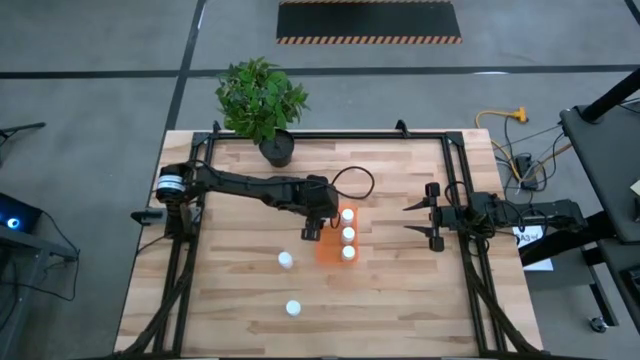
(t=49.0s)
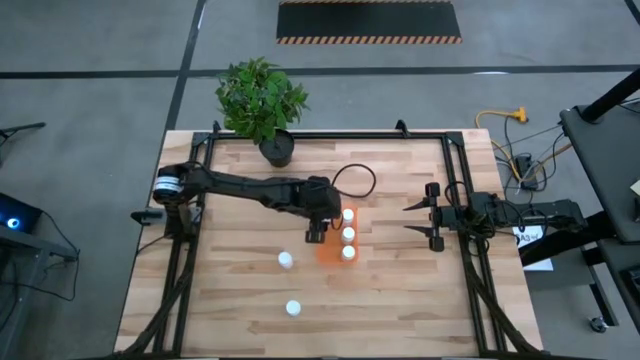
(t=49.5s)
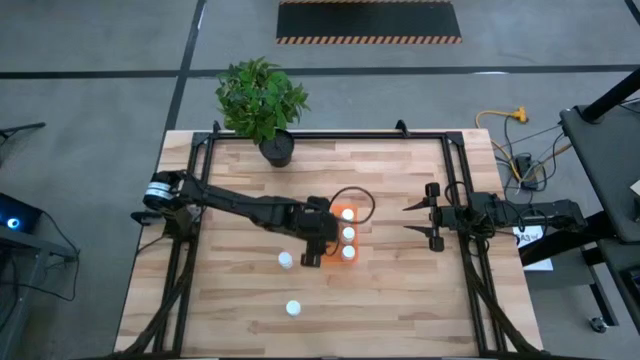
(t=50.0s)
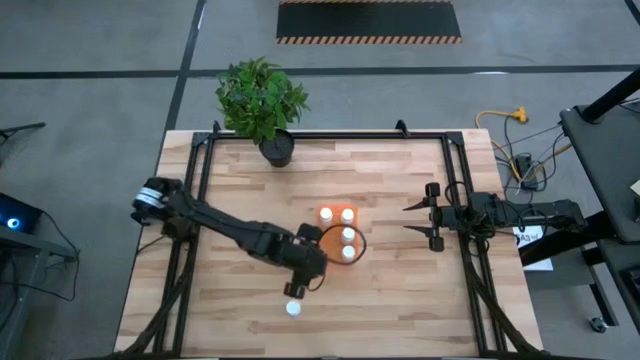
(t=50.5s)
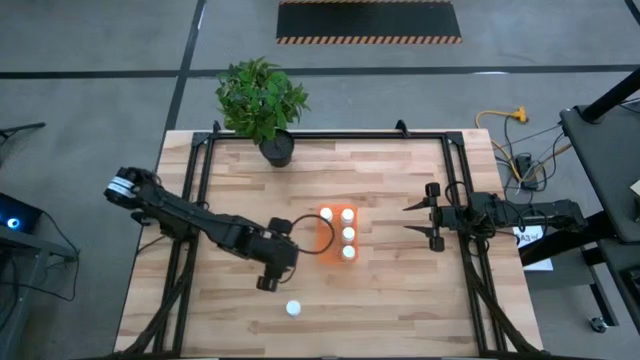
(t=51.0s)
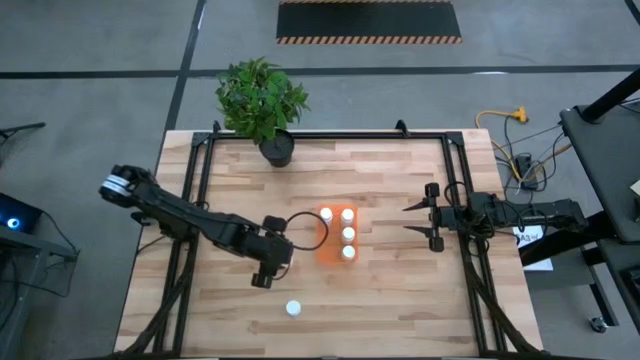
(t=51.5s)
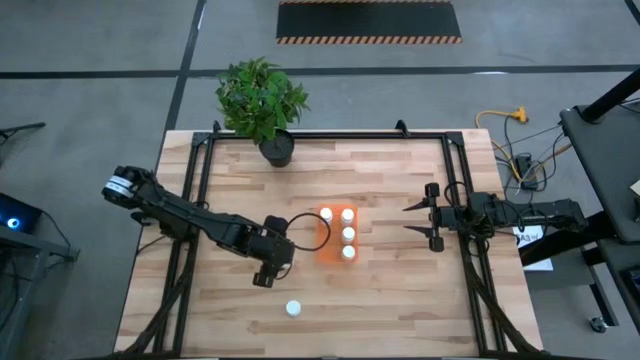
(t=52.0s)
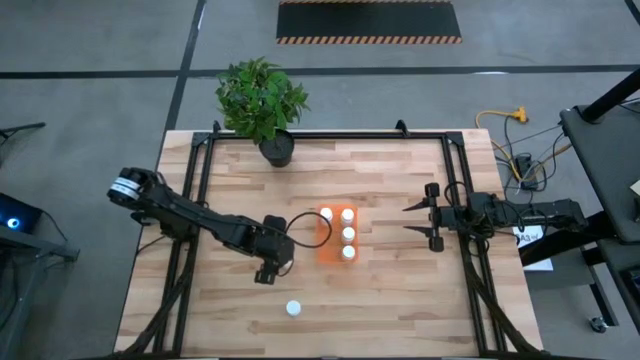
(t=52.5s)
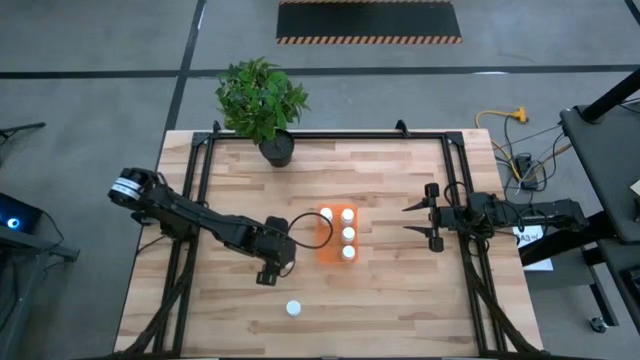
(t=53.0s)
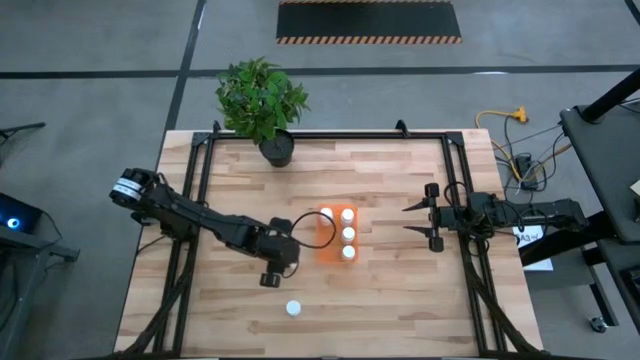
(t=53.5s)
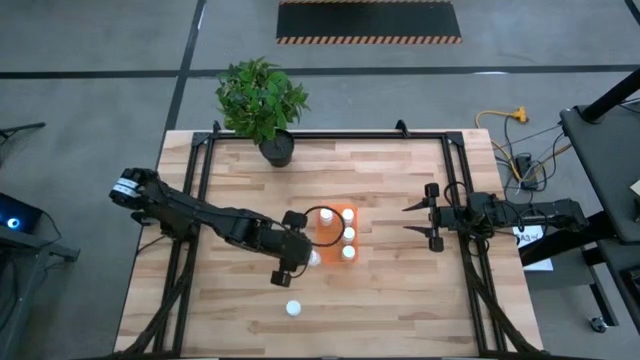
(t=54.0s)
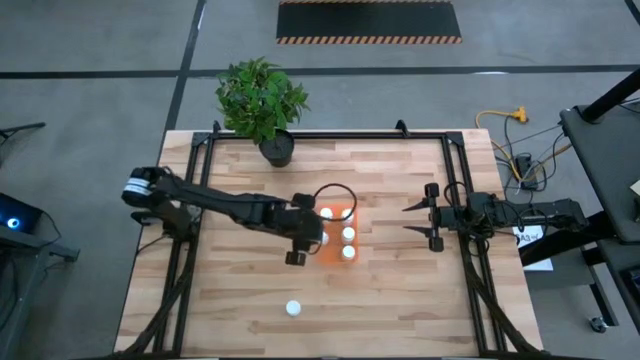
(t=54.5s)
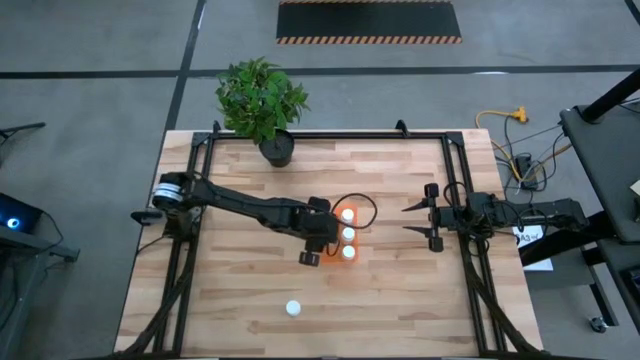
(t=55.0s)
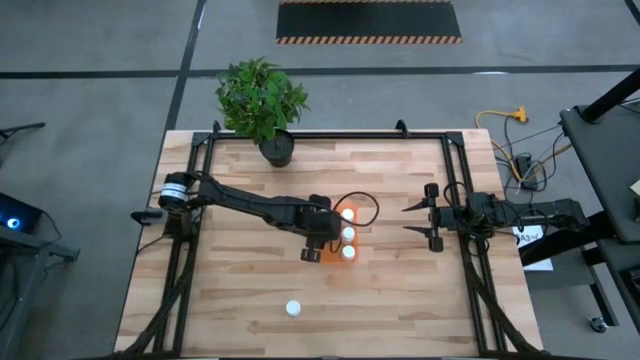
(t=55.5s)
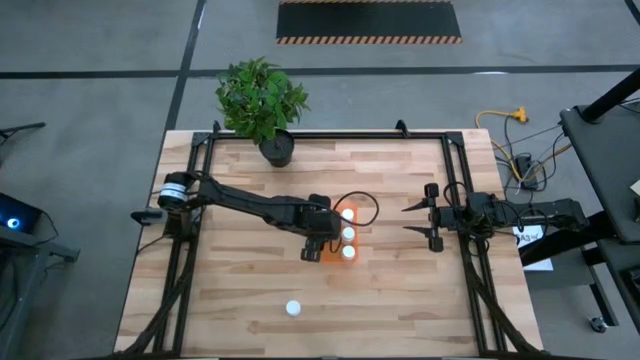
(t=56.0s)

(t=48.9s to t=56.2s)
Task: Pick and place pill bottles into a basket
Put the white pill bottle into the orange bin

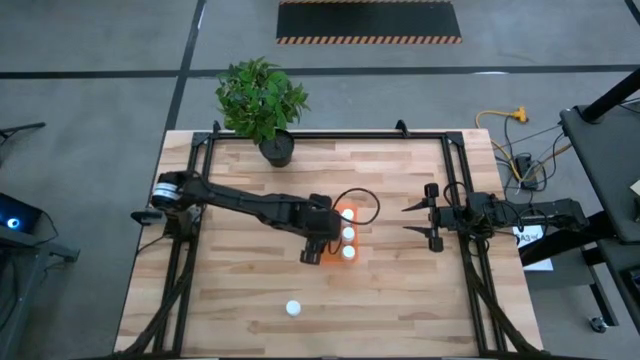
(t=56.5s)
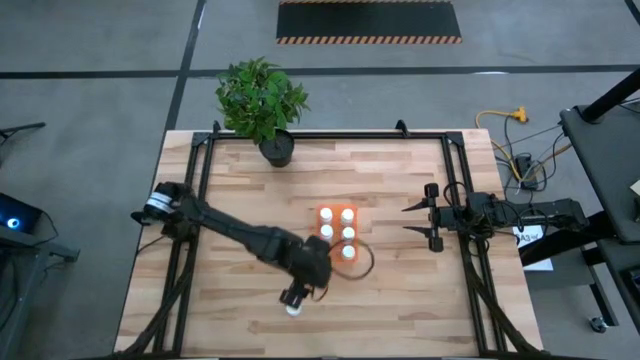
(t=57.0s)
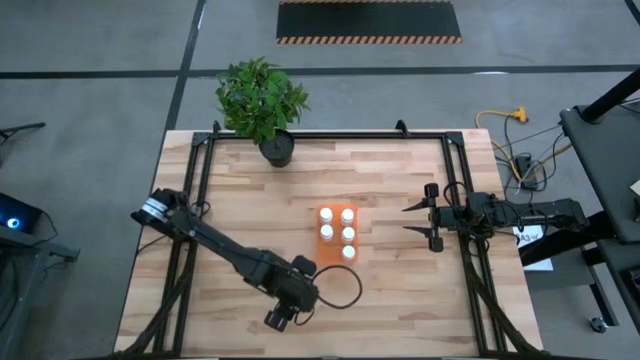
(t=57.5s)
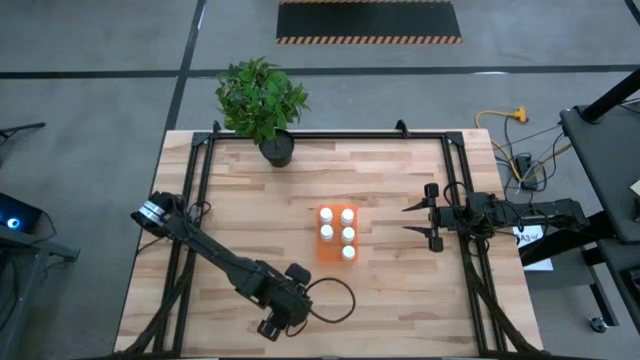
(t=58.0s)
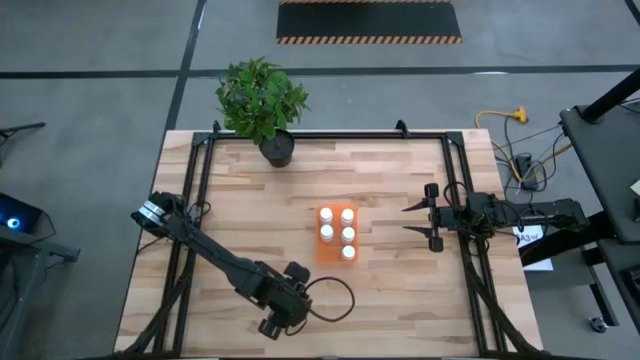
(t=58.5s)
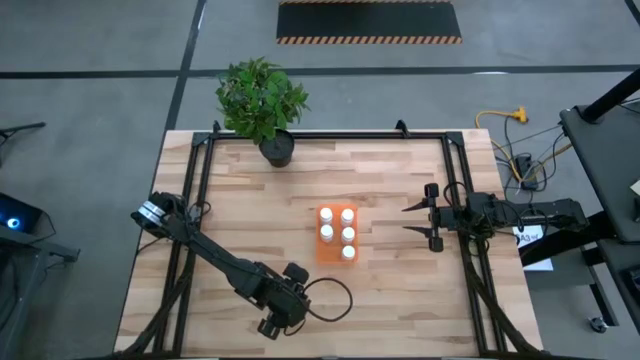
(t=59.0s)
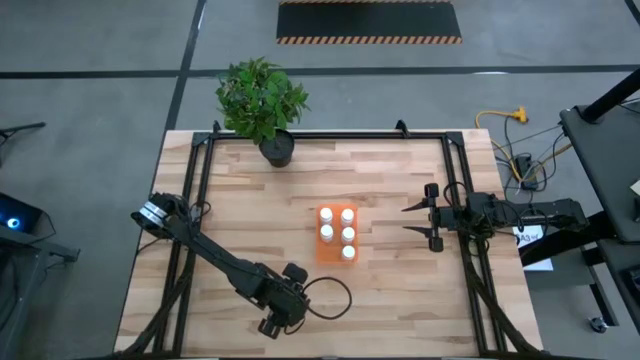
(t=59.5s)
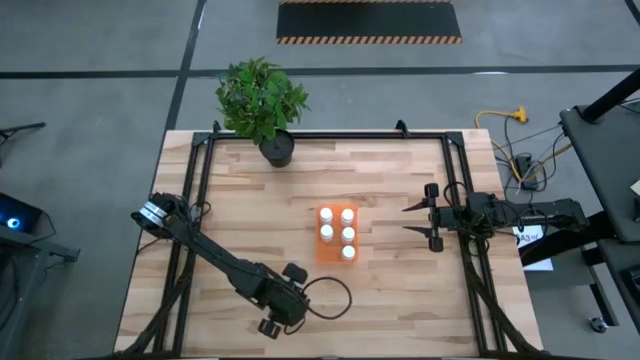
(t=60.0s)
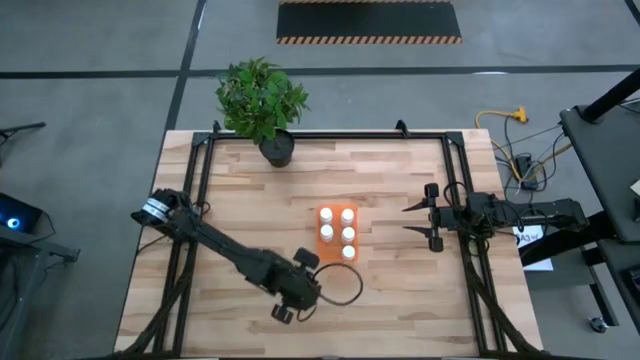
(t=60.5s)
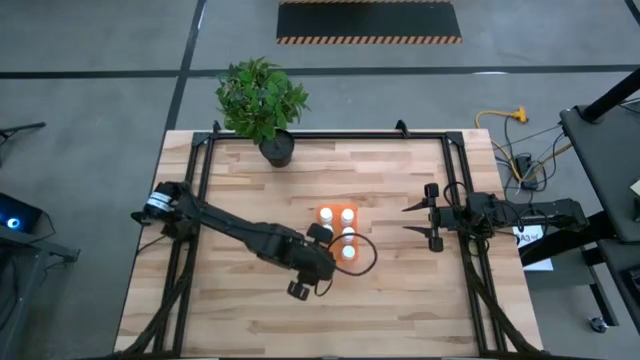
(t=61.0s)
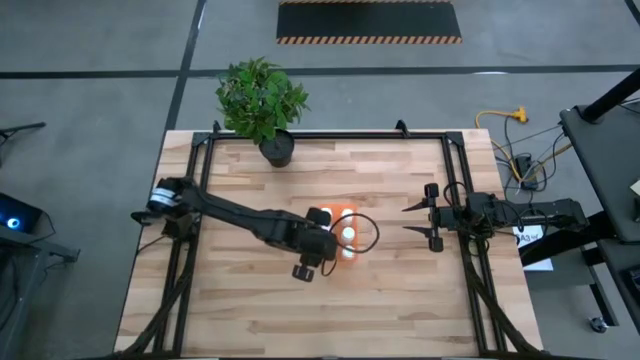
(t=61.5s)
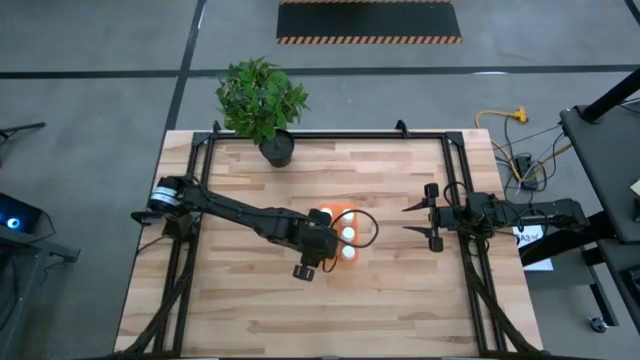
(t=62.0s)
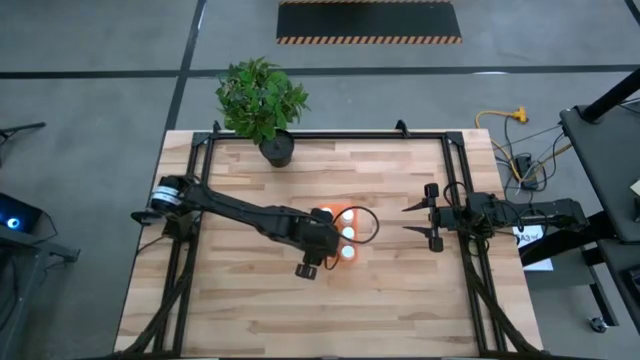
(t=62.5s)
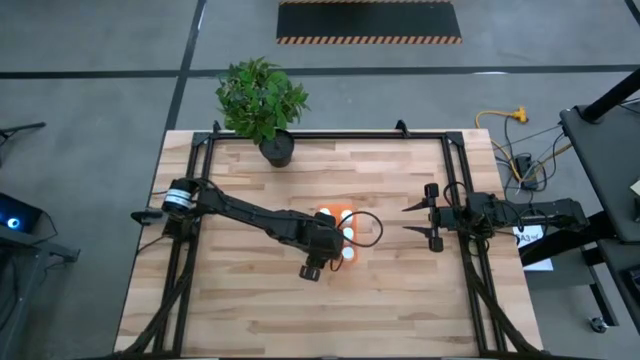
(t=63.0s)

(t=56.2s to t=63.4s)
Put the white pill bottle into the orange bin

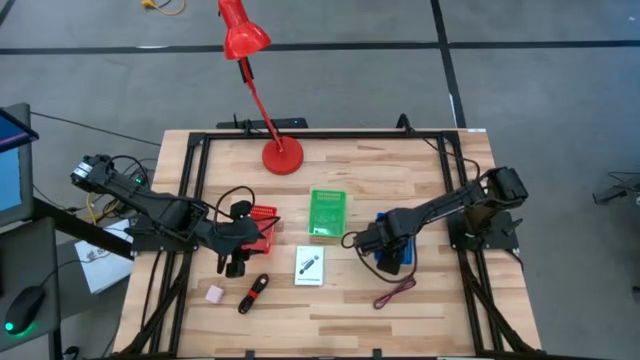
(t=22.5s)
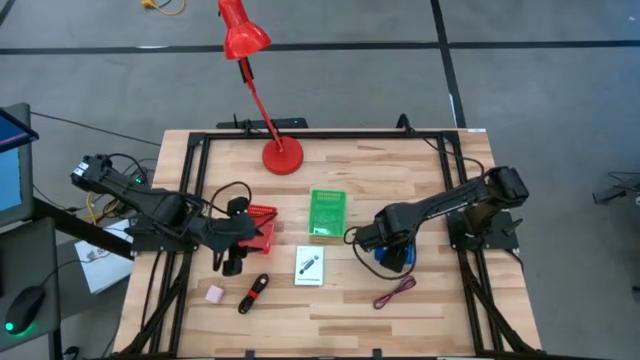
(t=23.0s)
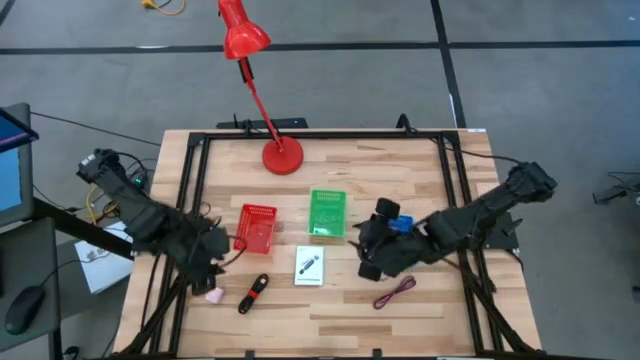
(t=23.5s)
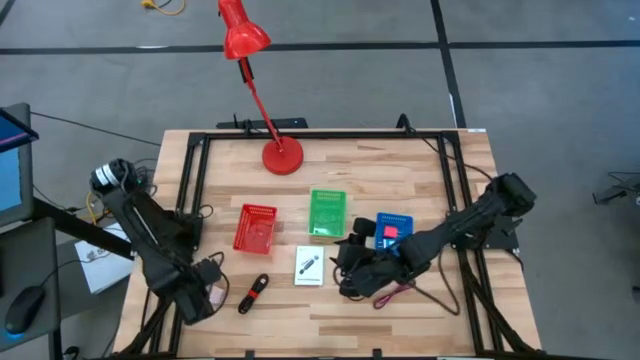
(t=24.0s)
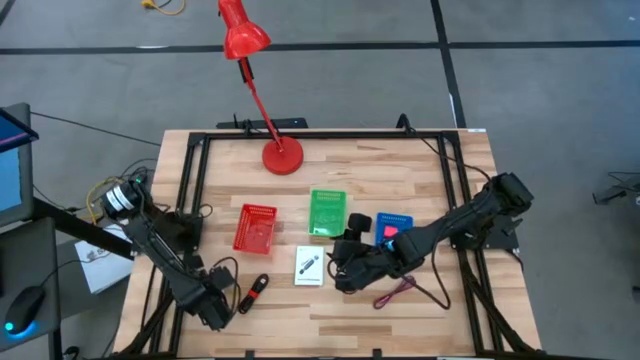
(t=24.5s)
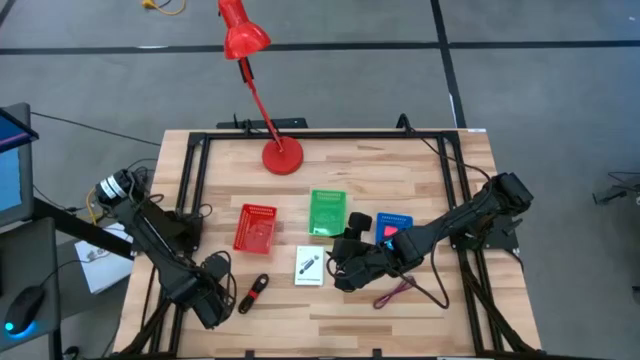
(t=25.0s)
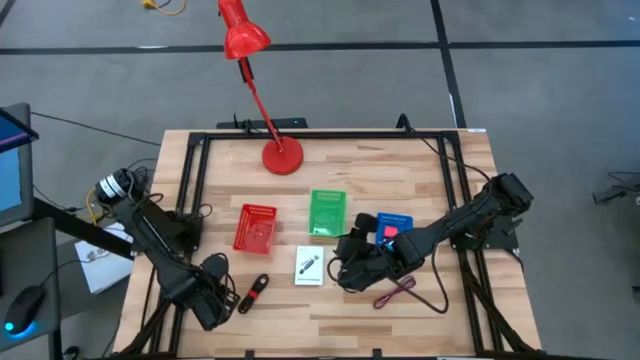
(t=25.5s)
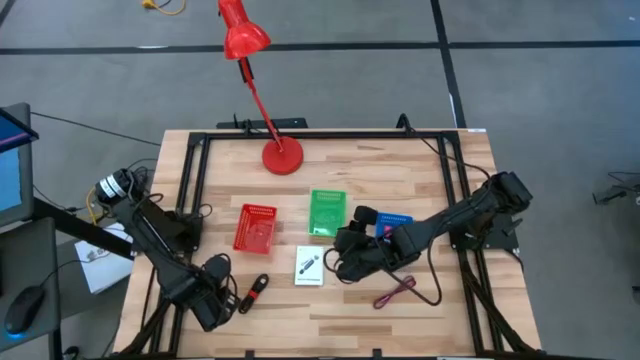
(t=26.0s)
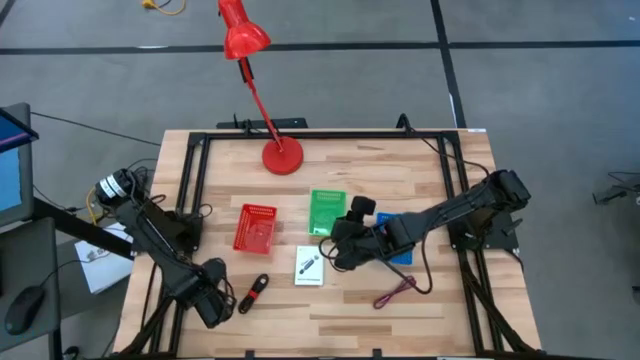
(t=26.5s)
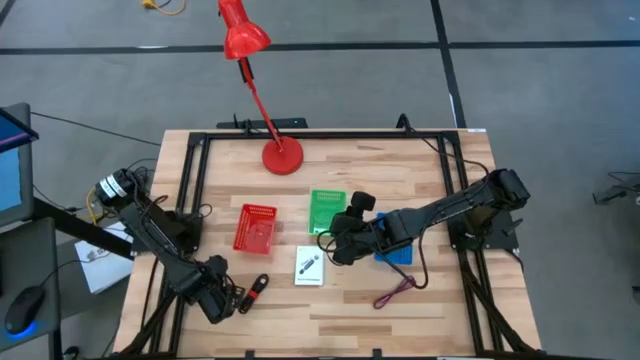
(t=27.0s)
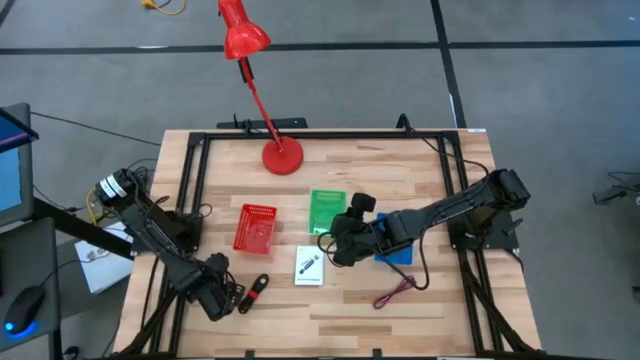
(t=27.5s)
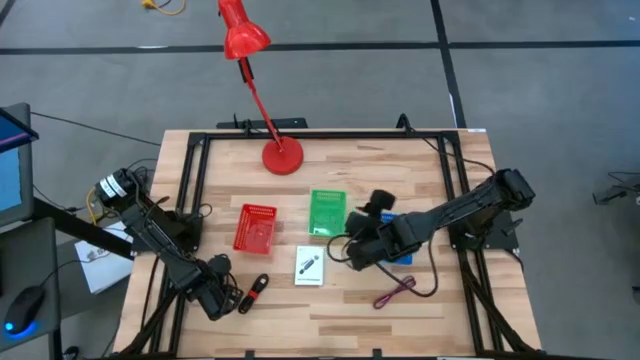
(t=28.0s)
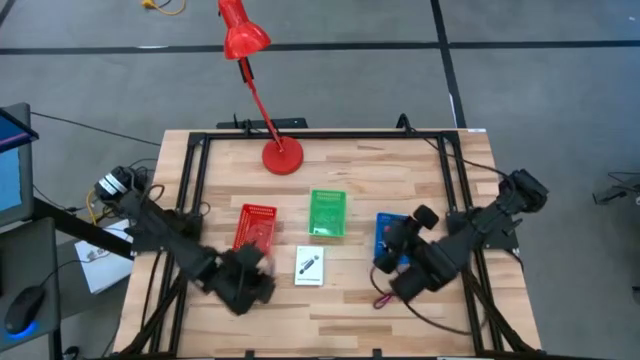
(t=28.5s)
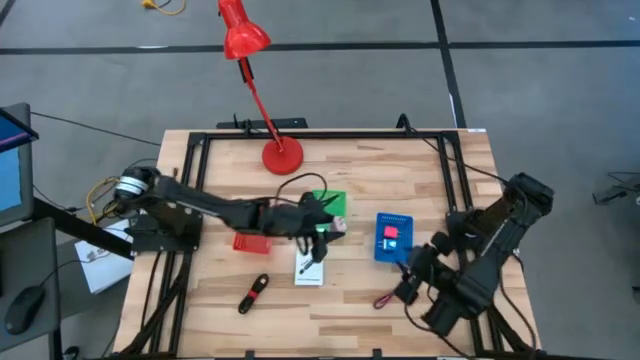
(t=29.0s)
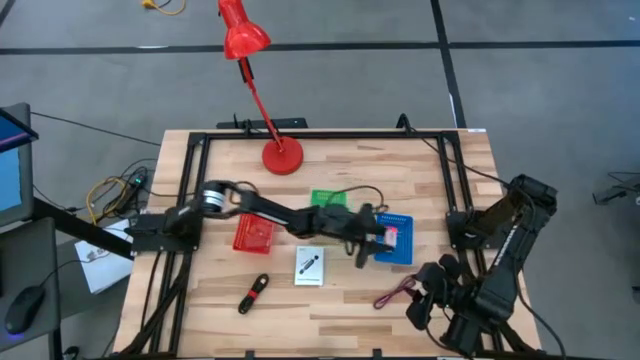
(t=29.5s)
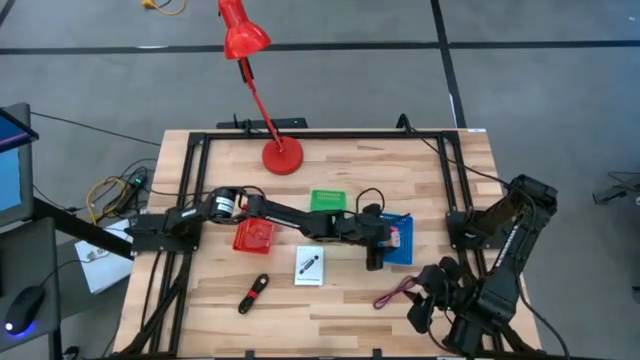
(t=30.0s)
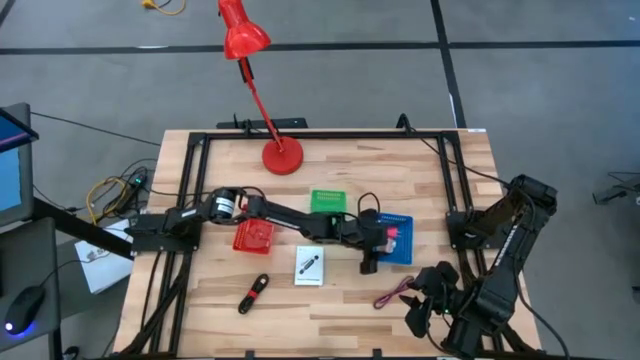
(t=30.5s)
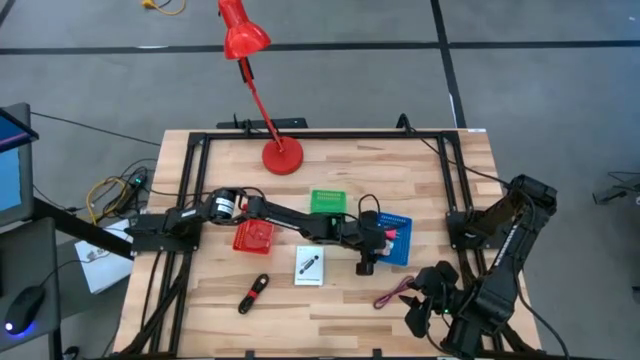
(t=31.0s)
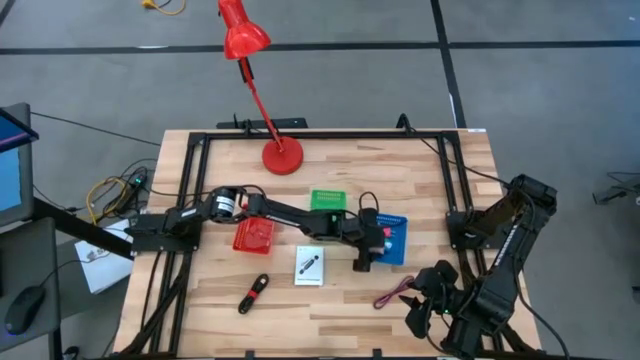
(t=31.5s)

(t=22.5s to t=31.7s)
Task: Pick and place items into bin
Put the white charger adapter into the blue bin
